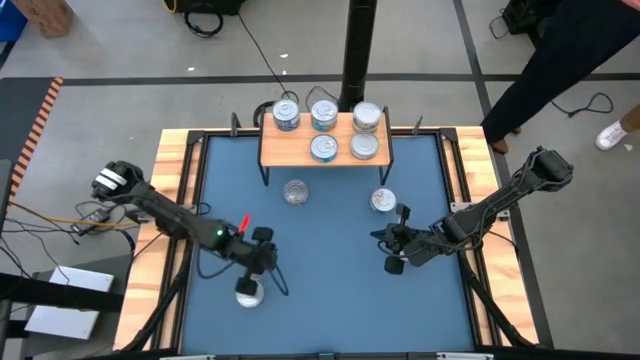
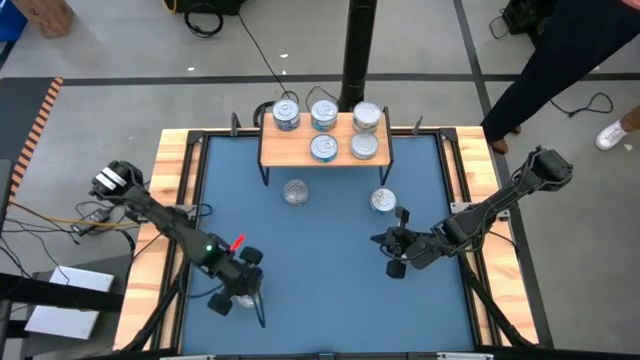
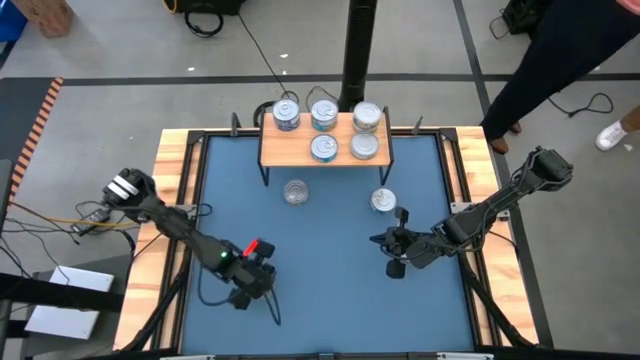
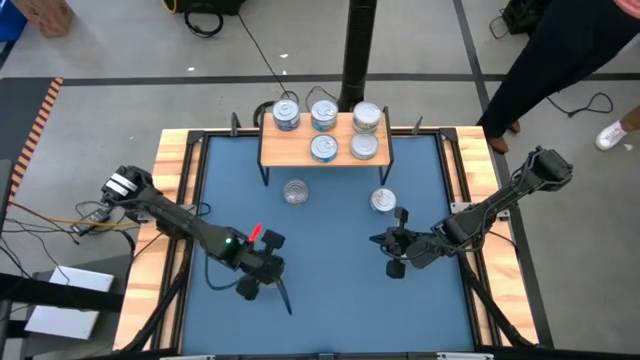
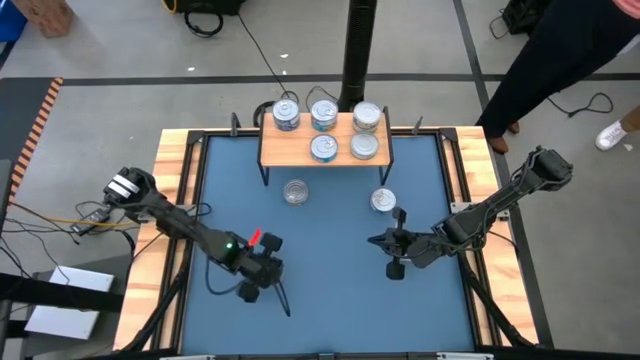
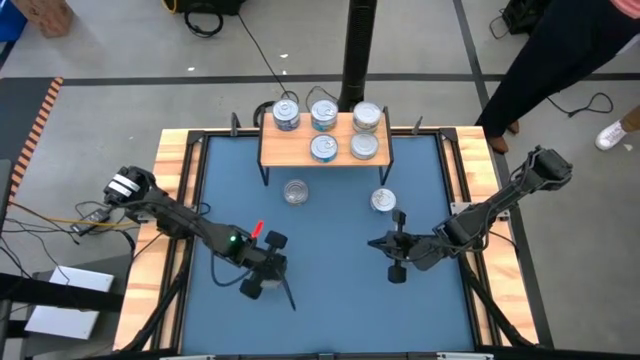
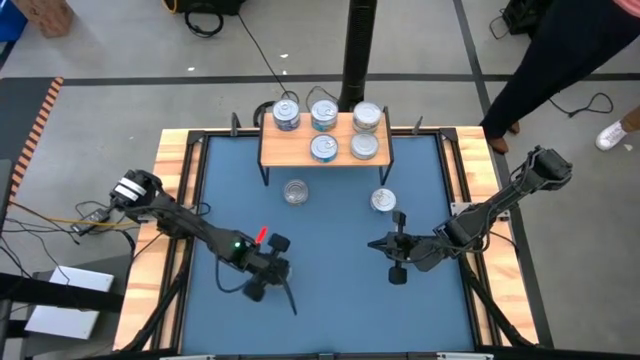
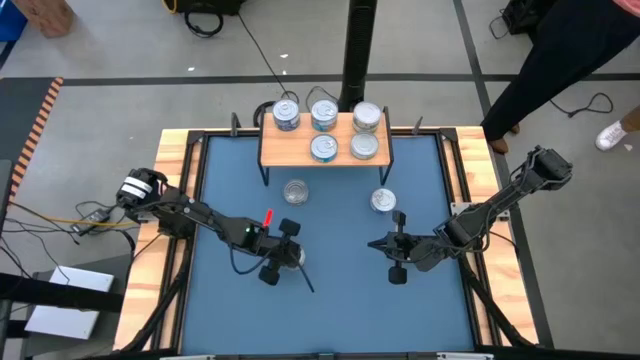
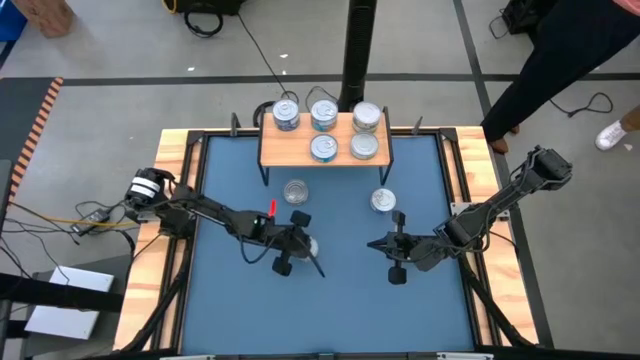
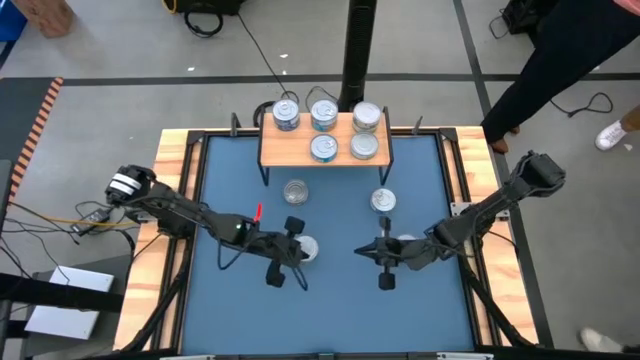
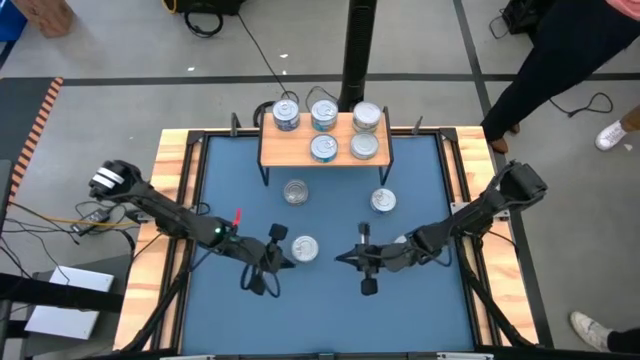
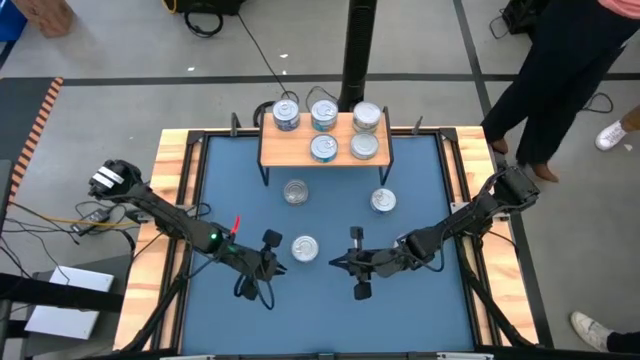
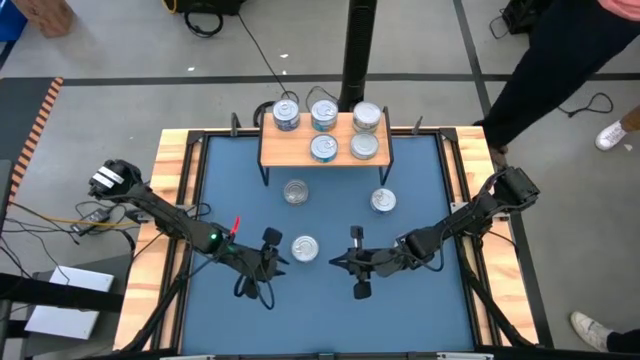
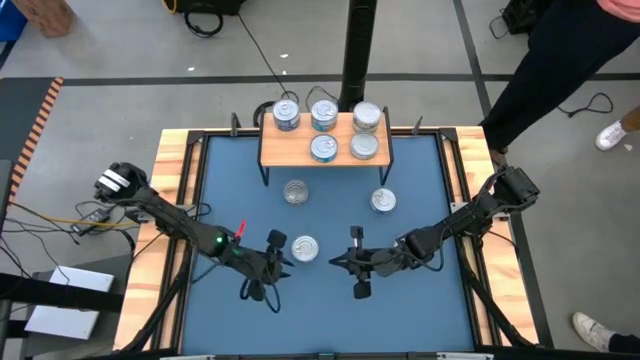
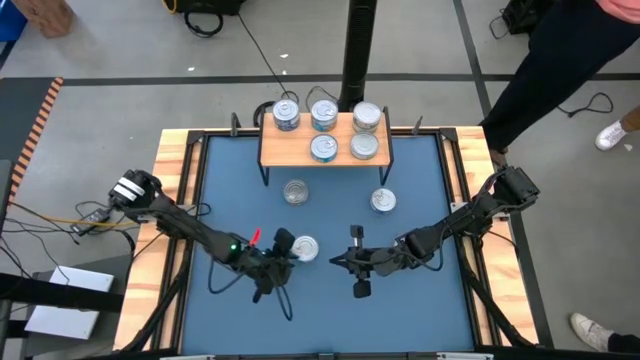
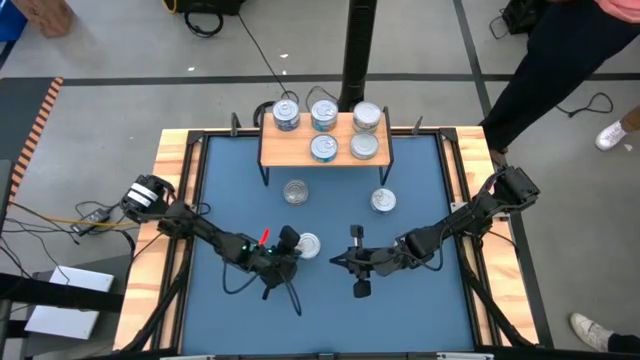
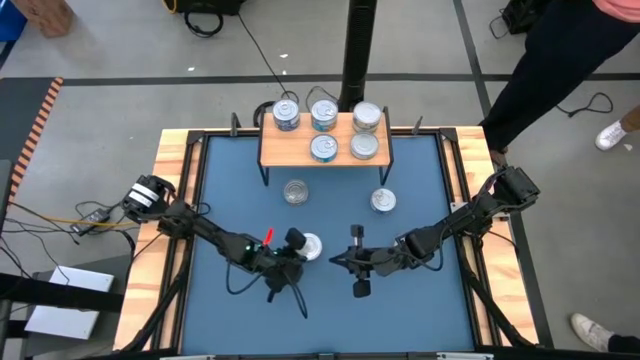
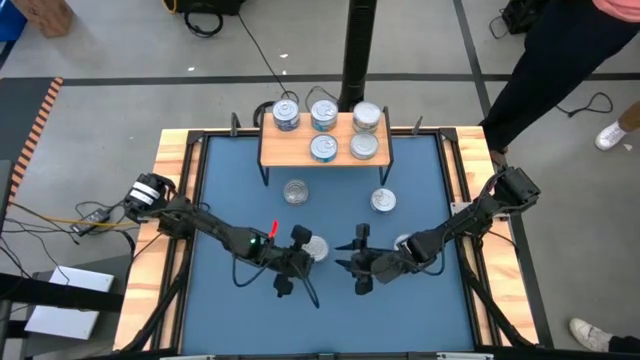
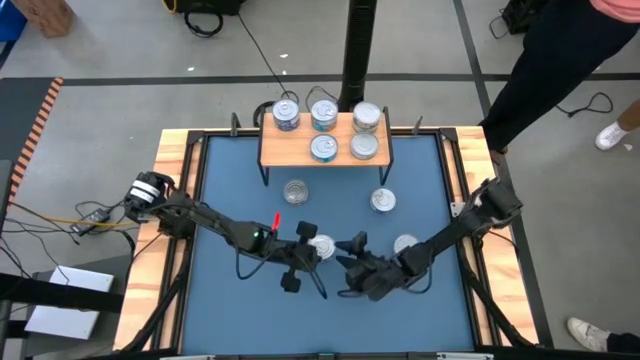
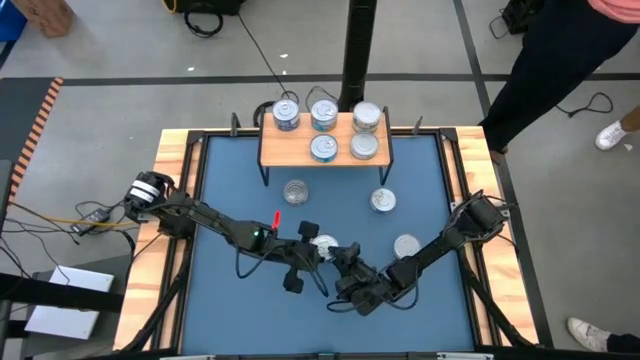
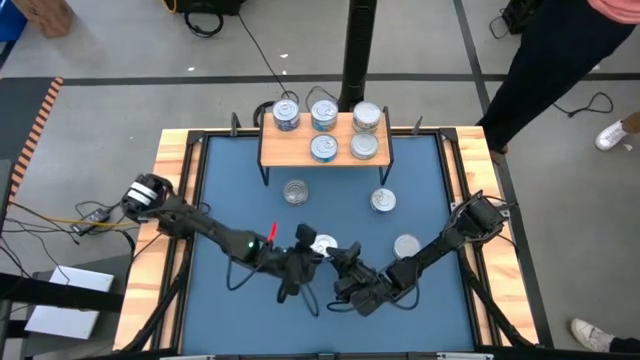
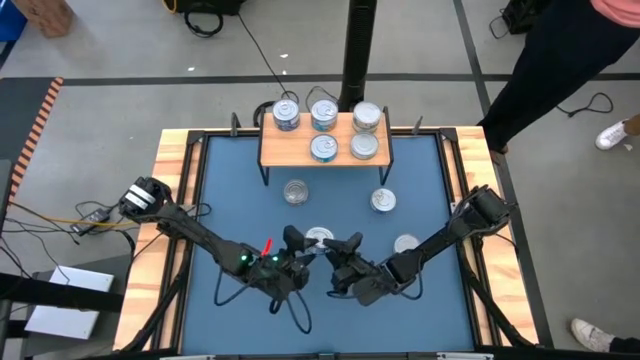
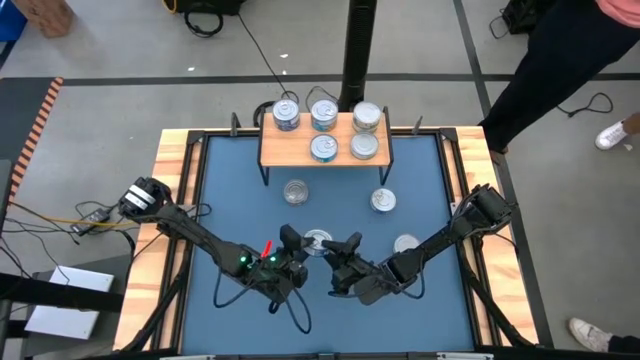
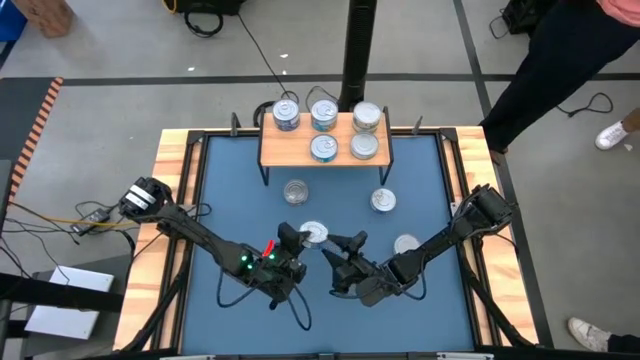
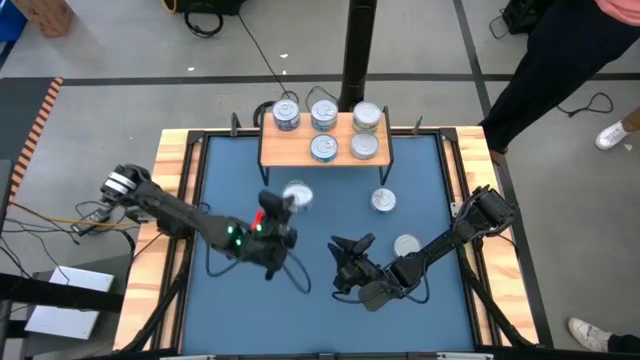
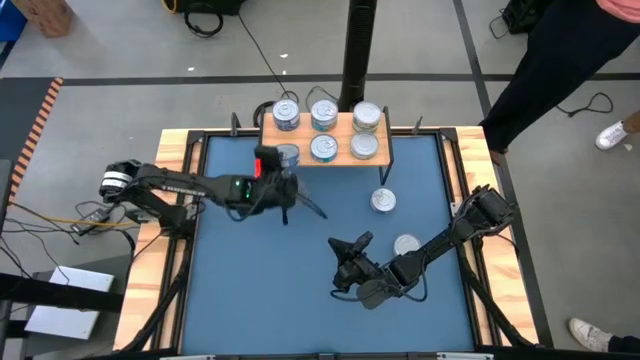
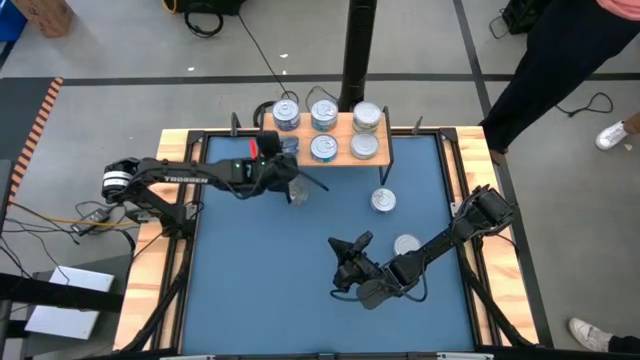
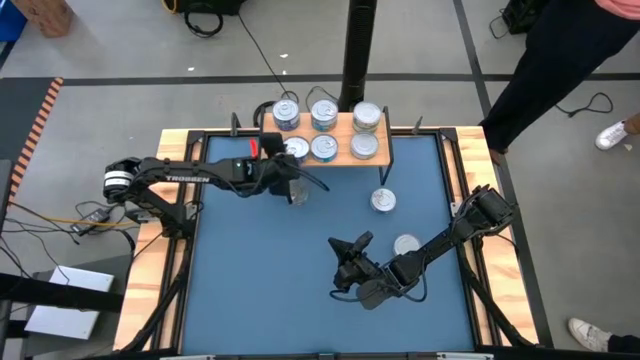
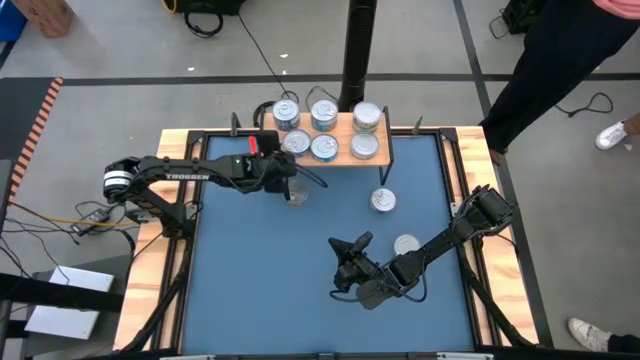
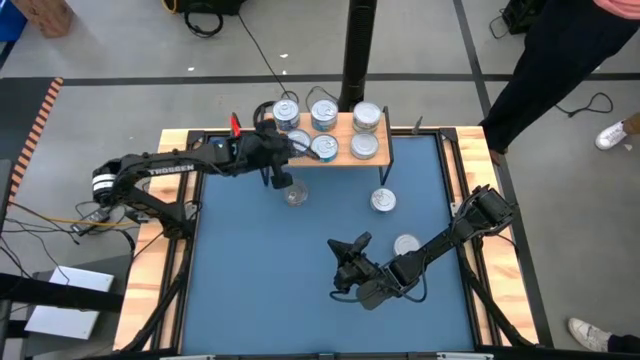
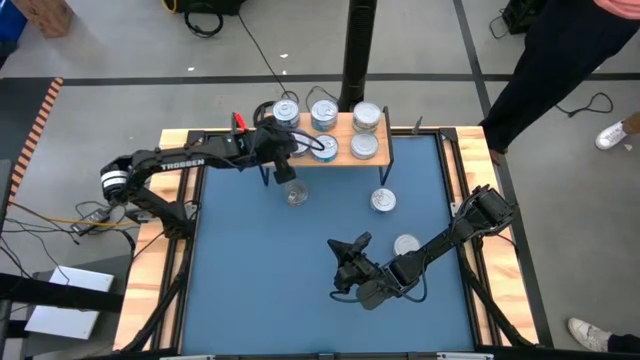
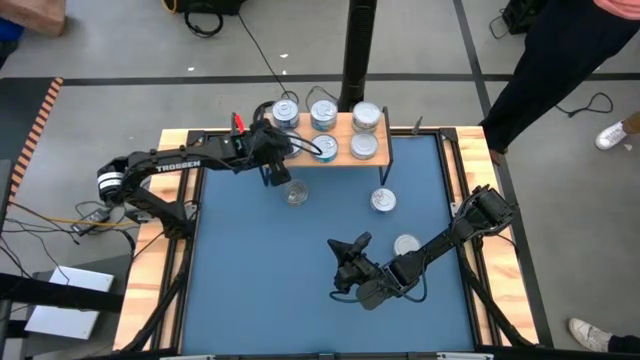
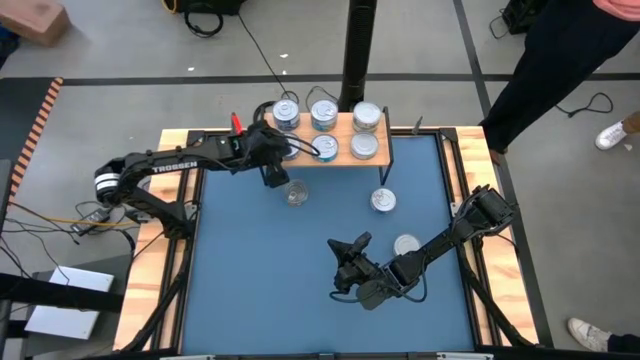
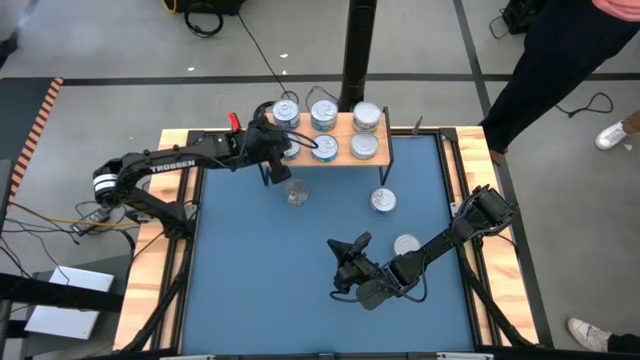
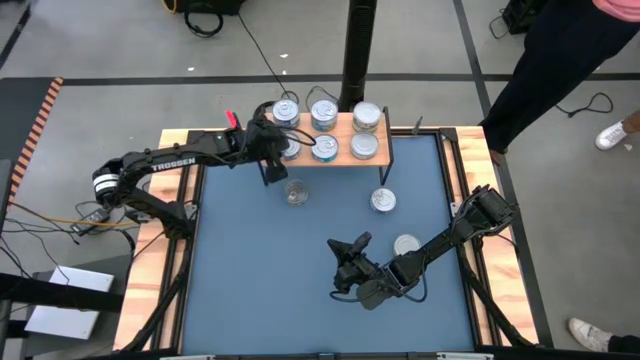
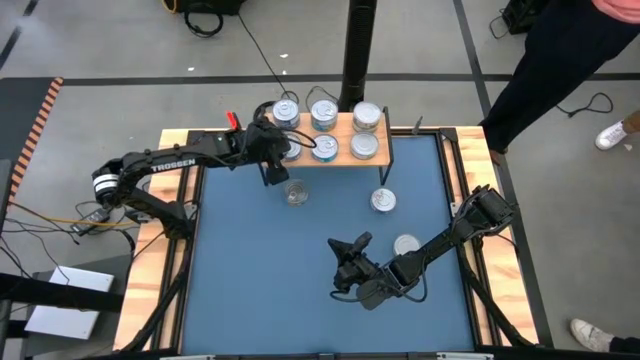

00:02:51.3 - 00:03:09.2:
Task: Stack canned seafood by type on shelf
Put the blue tuna can on the shelf aligned with the other blue tuna can

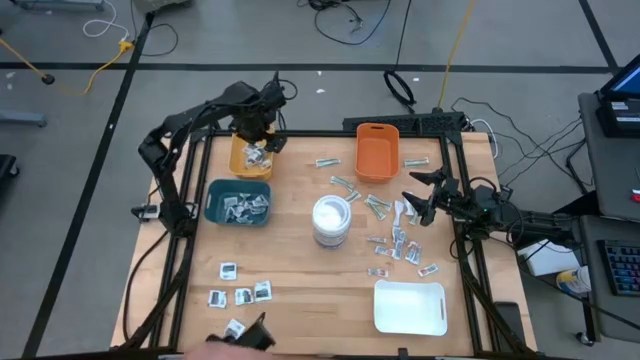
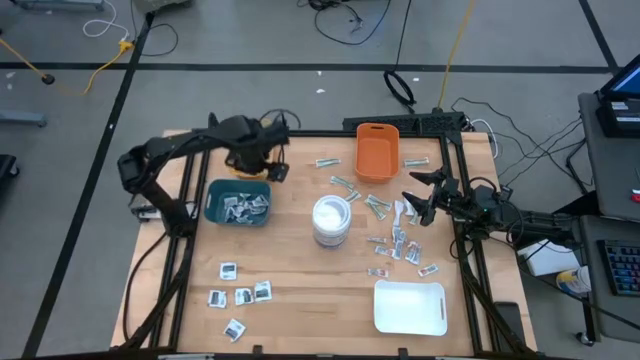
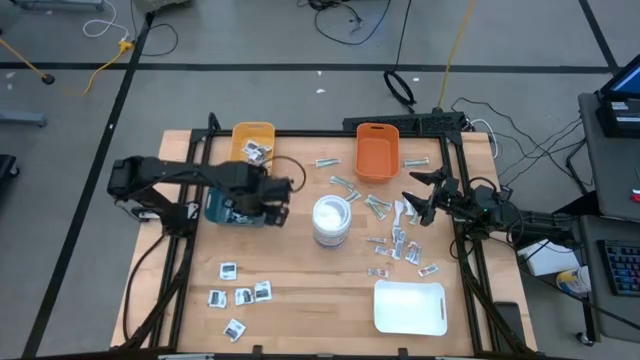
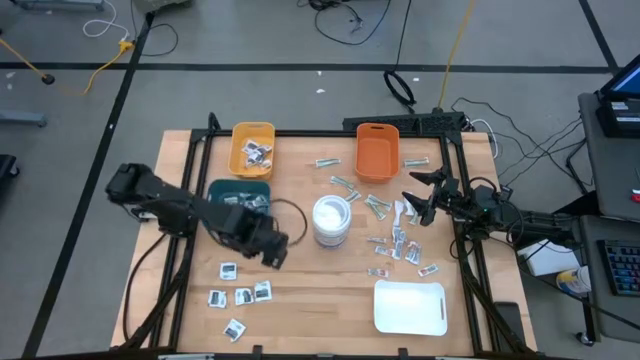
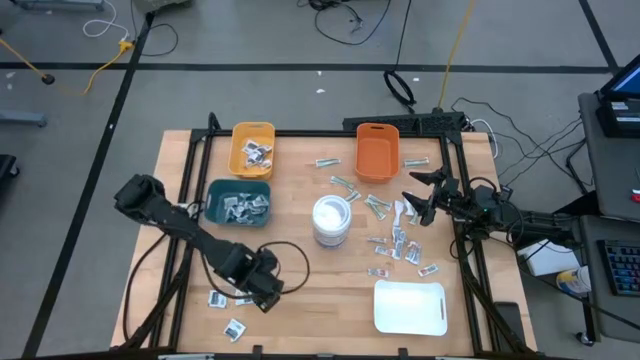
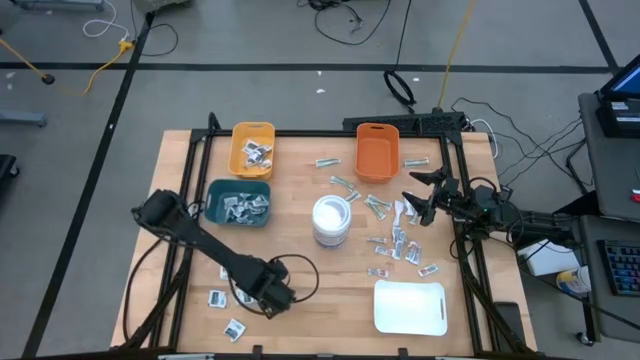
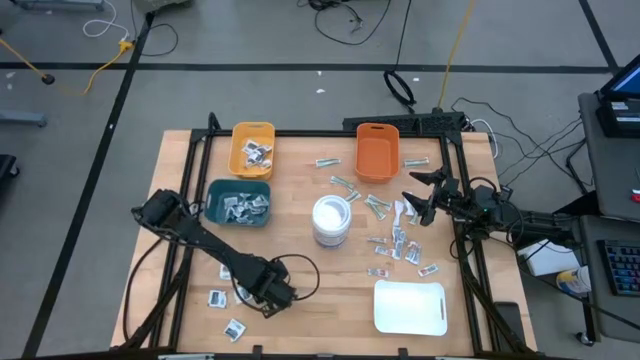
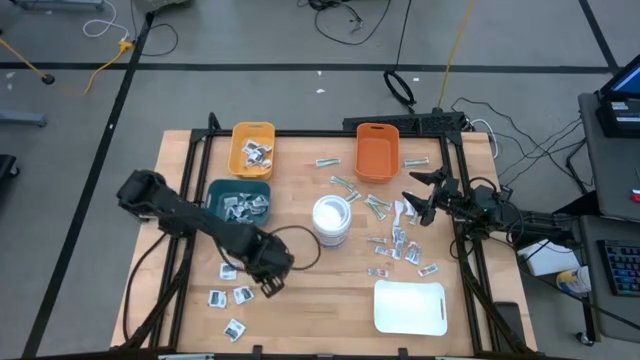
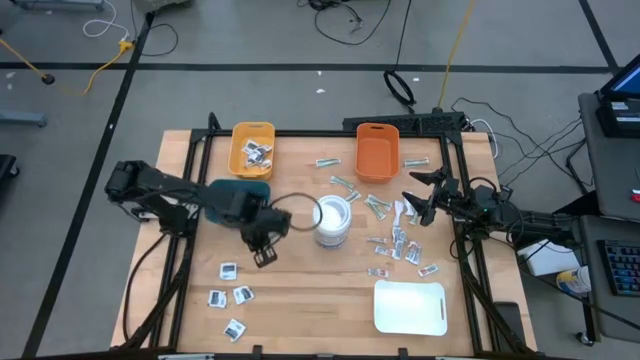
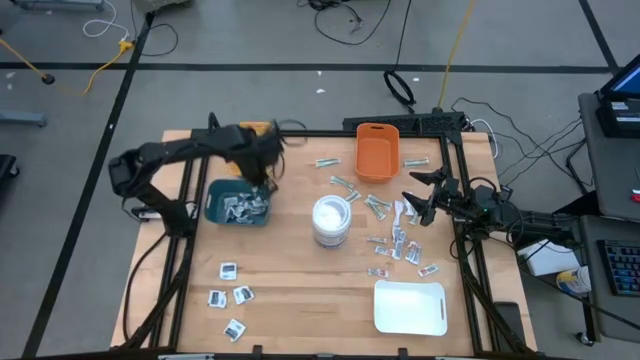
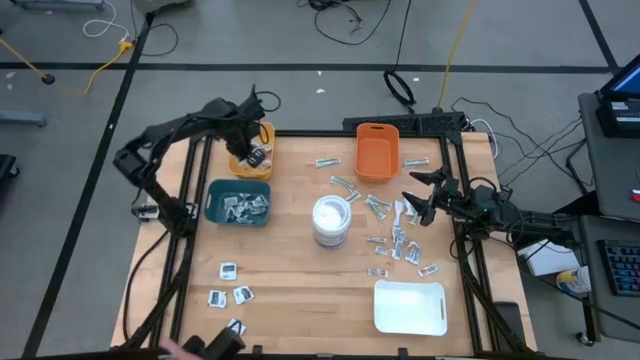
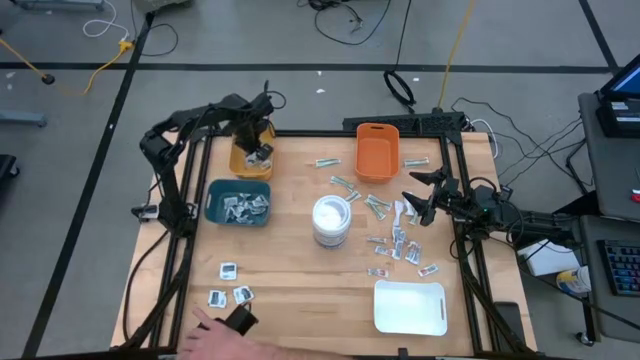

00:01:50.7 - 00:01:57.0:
Task: Pick & Place First Aid Supplies
Put the black pad into the yellow bin
